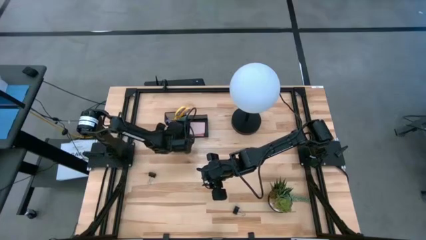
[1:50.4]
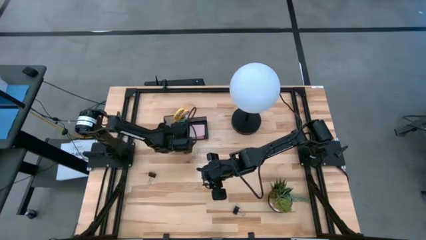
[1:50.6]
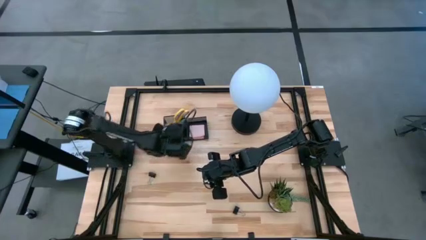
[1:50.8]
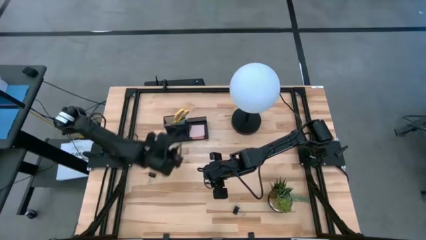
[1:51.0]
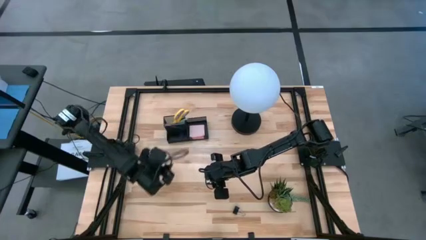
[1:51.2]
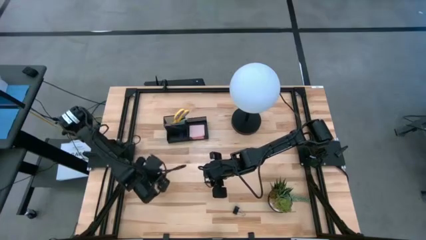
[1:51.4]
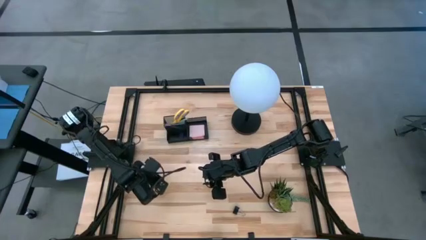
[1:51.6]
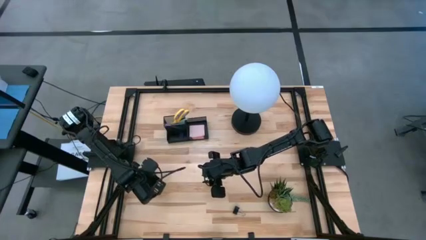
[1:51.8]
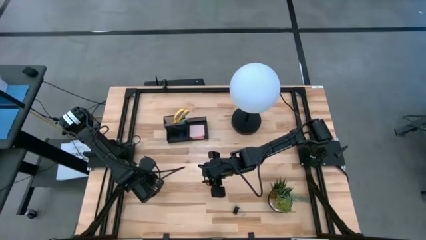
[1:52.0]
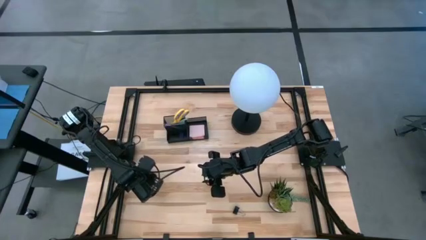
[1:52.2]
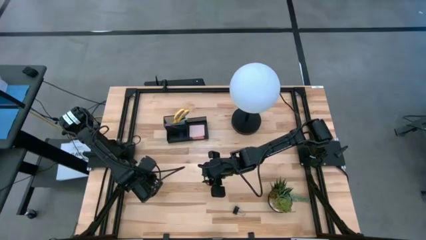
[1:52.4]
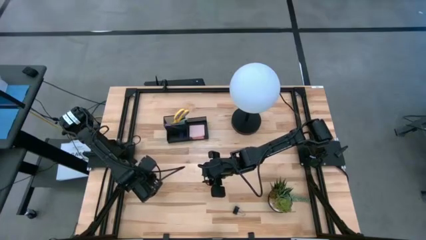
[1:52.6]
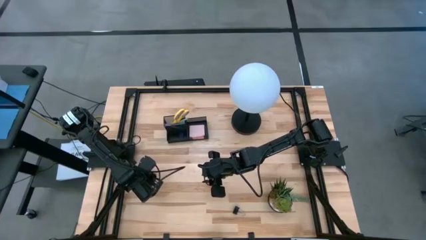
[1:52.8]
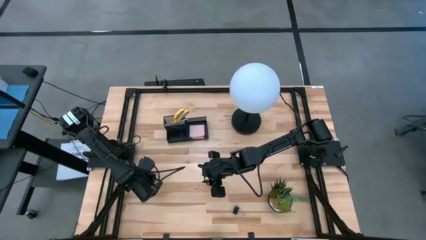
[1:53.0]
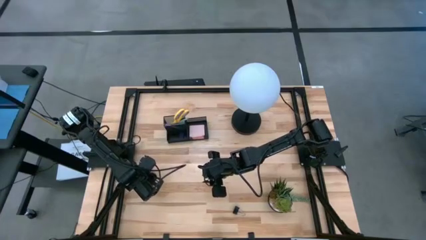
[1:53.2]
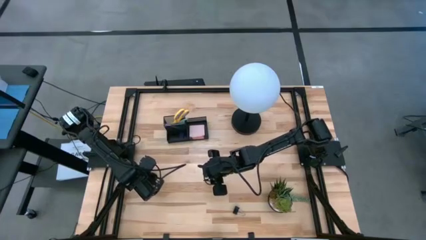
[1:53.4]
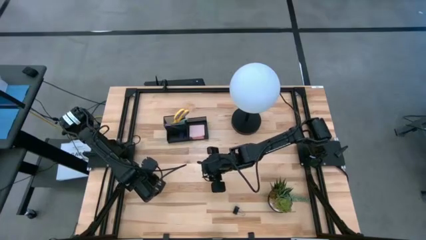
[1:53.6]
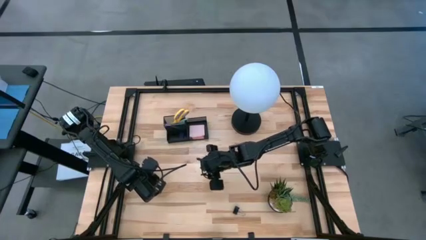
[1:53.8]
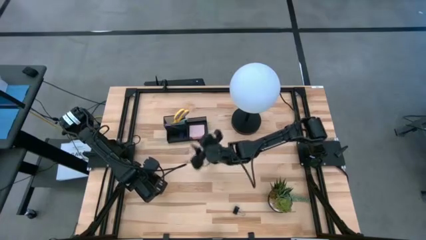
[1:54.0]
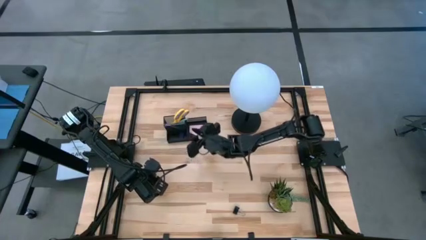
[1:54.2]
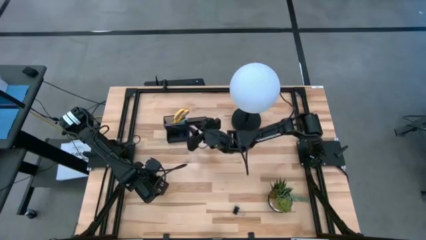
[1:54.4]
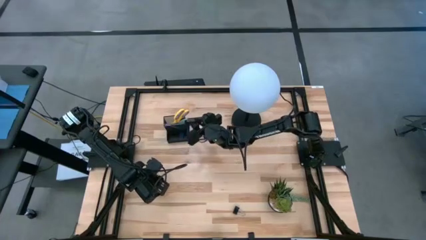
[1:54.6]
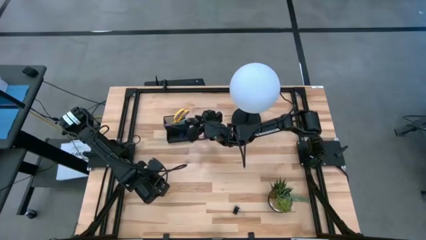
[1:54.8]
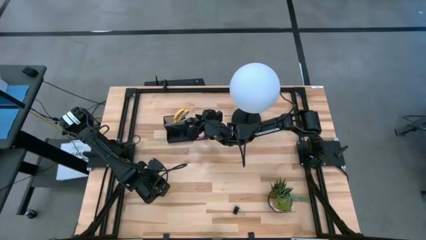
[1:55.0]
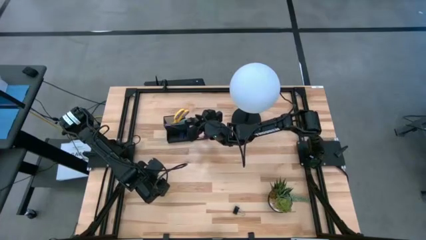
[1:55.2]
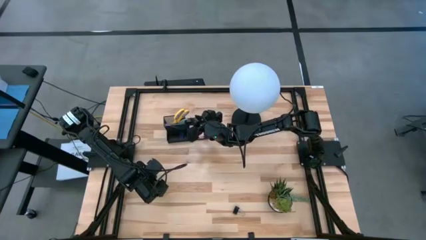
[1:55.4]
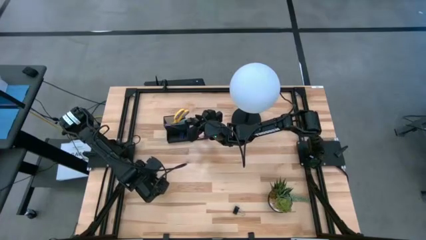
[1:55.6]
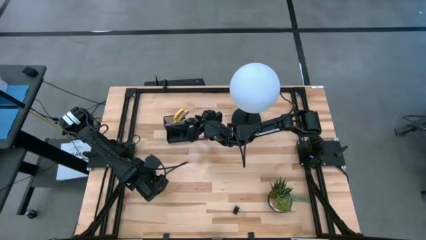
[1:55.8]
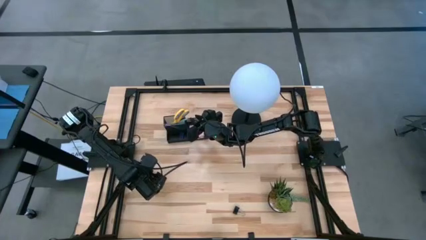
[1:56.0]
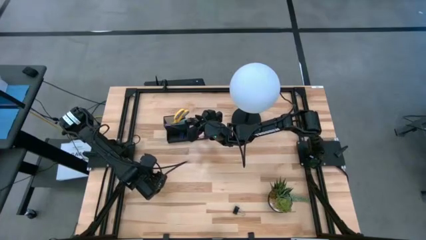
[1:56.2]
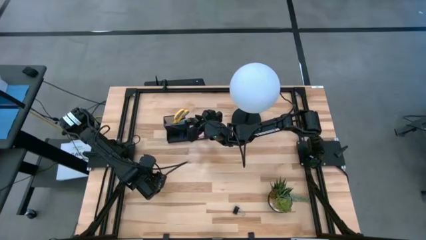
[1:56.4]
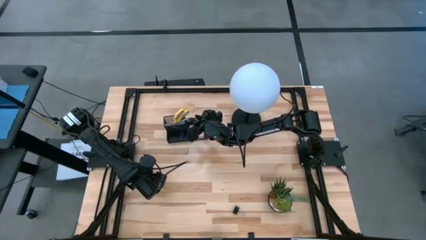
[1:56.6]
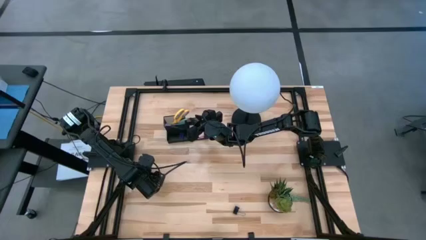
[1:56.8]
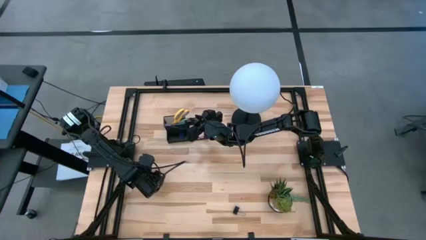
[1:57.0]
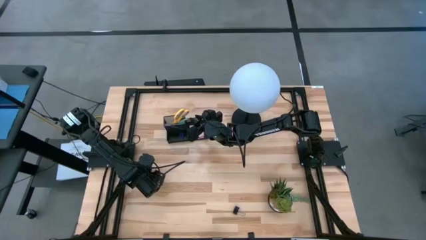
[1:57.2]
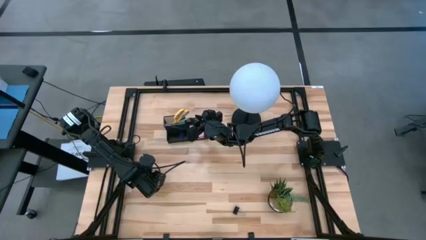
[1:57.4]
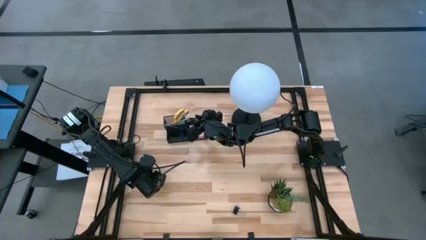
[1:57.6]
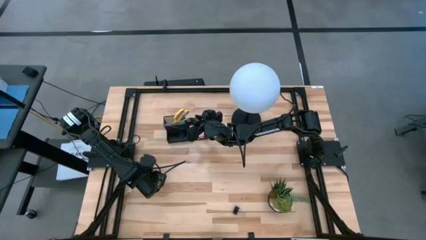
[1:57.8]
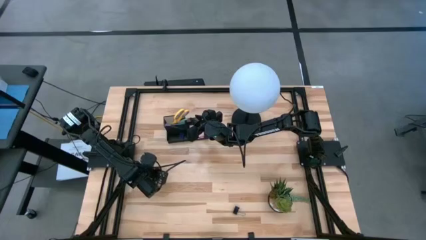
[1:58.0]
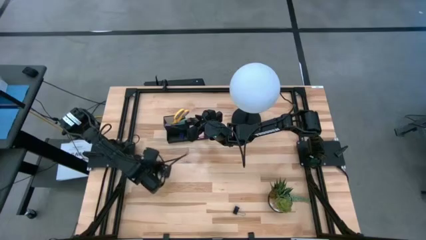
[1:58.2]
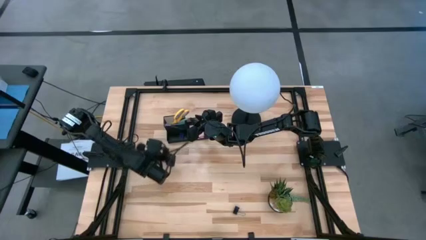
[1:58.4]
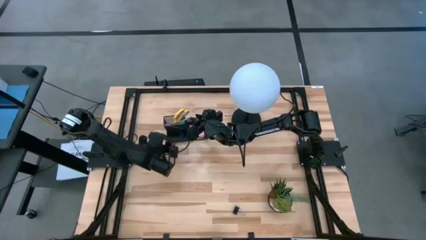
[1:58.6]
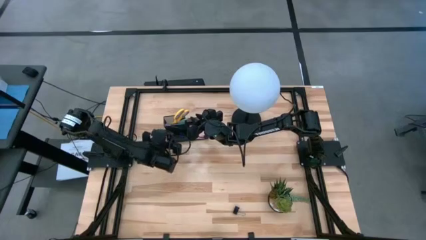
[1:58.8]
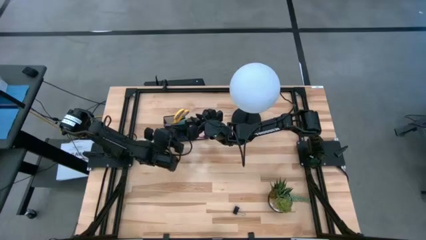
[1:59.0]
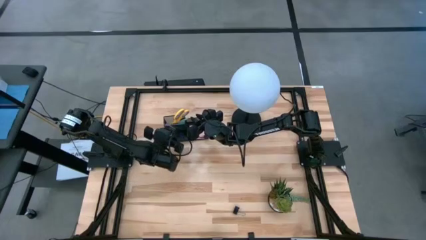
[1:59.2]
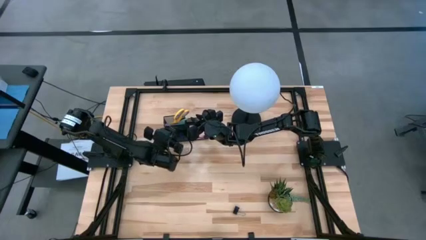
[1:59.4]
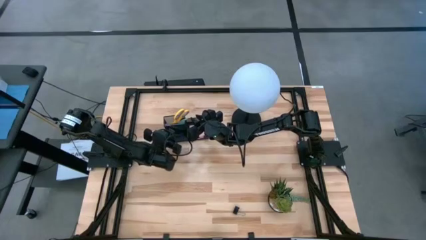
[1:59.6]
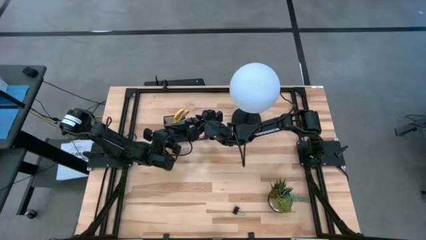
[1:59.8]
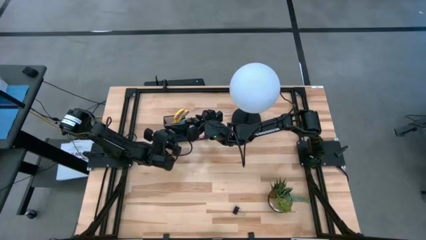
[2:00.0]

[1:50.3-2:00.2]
Task: Pick and place office supplies into organizer
Put the top left black binder clip into the black desk organizer

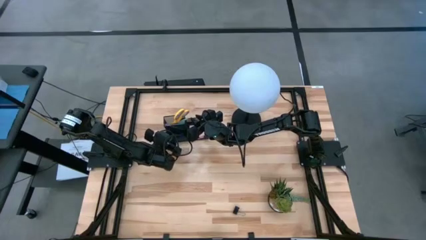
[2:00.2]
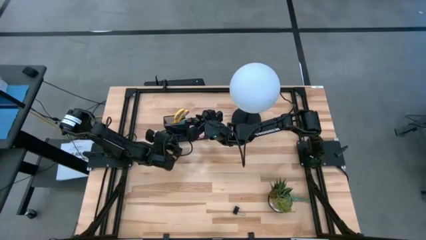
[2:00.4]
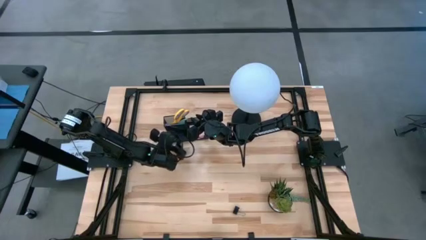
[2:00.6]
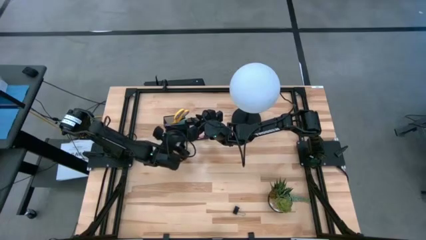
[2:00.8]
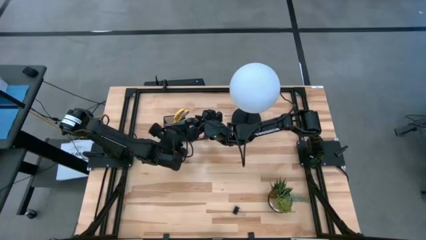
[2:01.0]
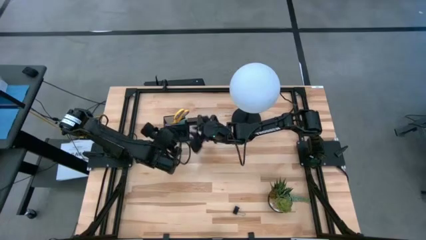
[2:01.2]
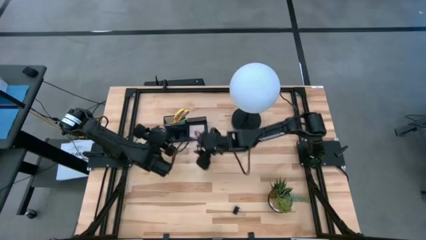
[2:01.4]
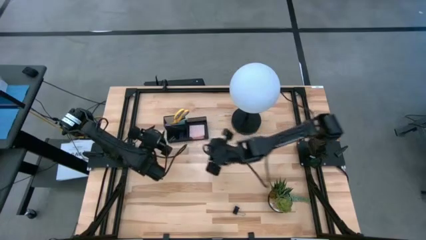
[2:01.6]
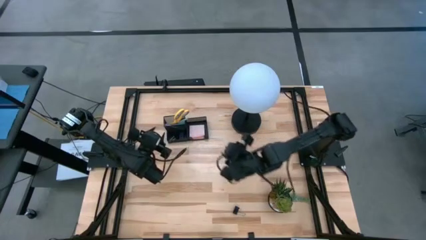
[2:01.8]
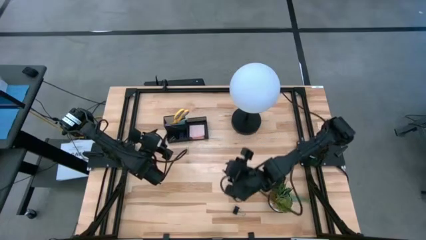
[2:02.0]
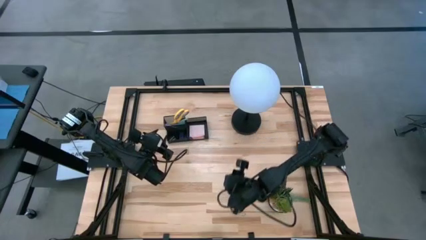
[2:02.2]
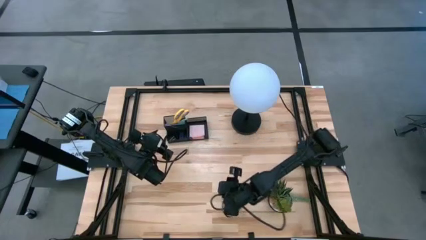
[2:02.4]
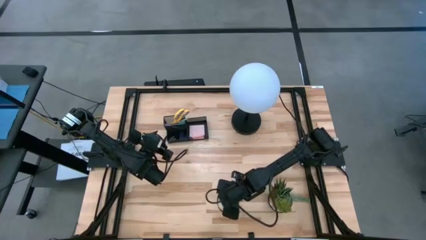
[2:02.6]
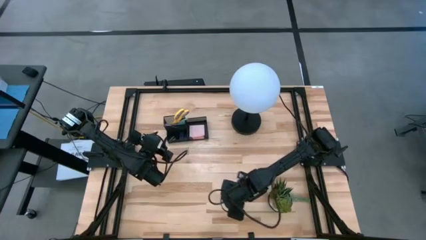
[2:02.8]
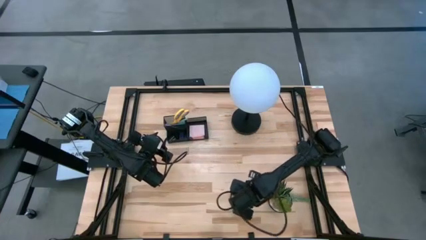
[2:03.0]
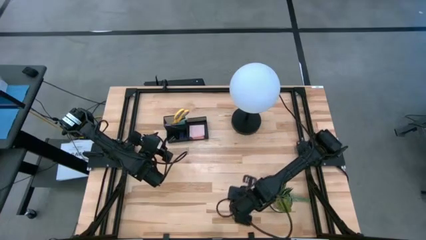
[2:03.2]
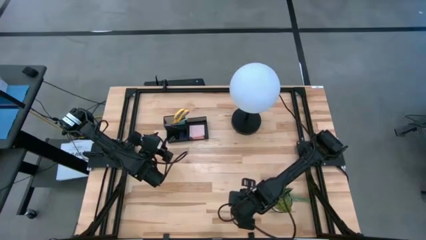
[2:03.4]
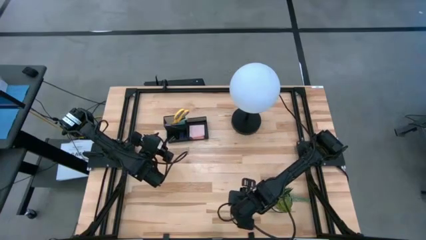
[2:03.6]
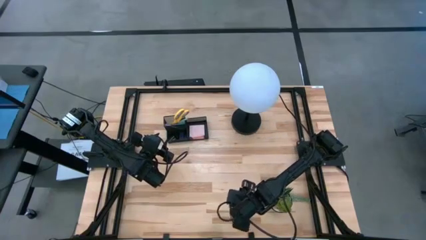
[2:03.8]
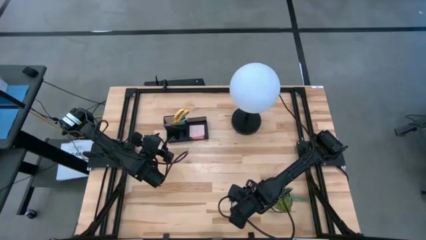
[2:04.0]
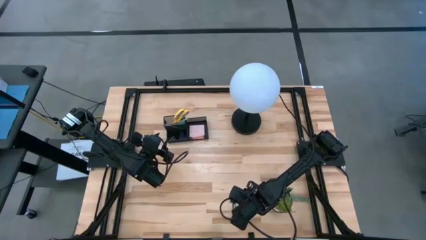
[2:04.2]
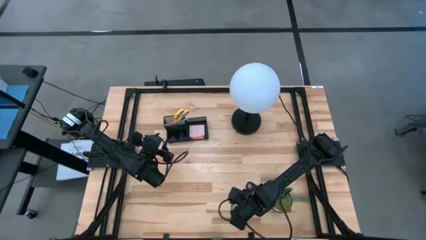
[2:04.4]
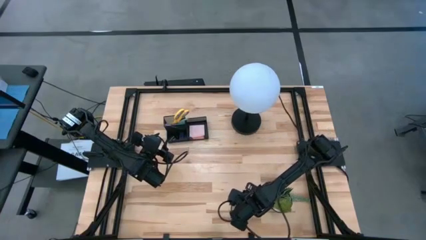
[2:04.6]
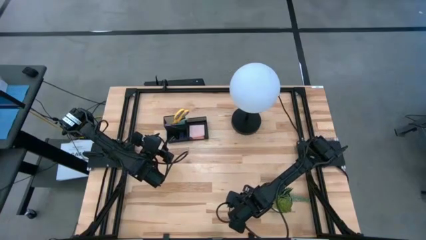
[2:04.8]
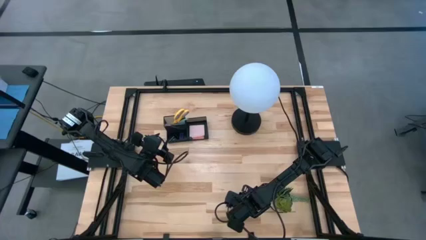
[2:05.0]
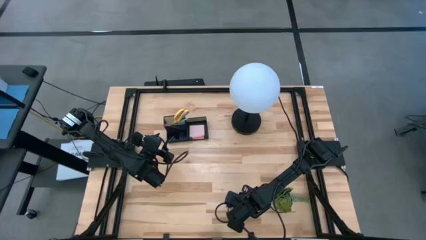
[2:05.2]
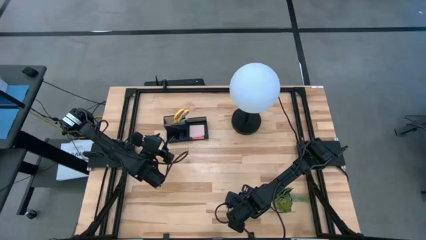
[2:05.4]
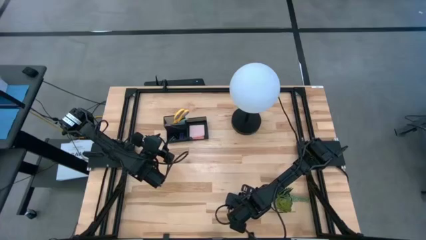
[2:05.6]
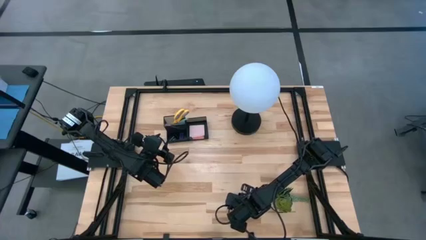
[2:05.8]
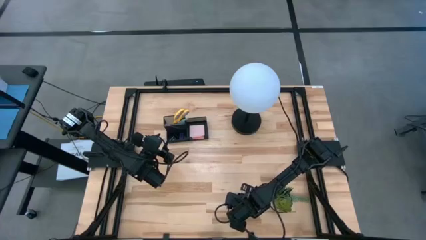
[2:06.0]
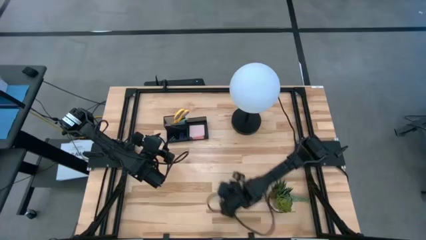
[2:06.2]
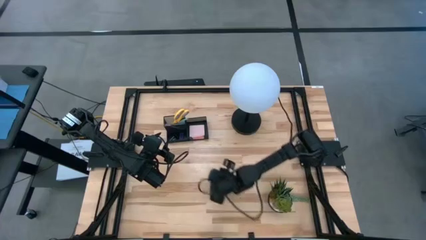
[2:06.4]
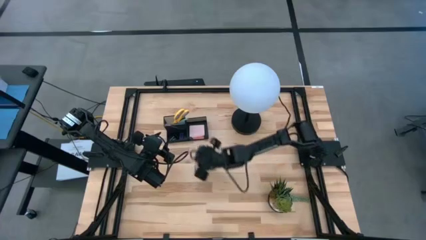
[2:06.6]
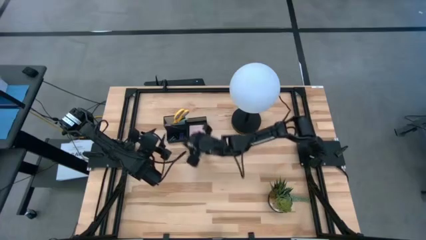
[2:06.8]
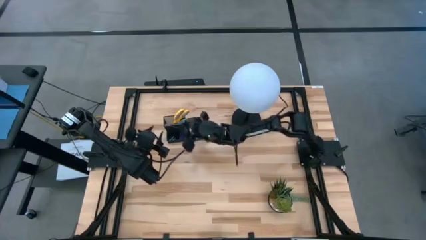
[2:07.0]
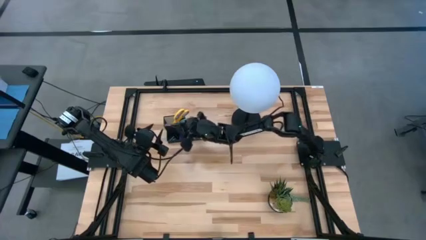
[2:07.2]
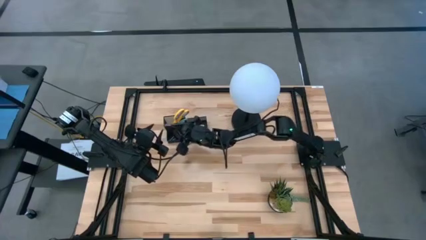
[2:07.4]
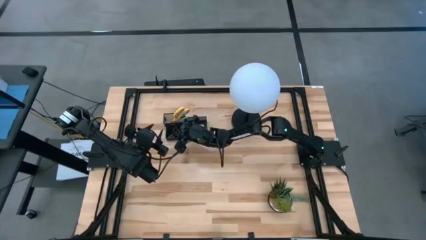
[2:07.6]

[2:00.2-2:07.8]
Put the black binder clip into the black desk organizer
